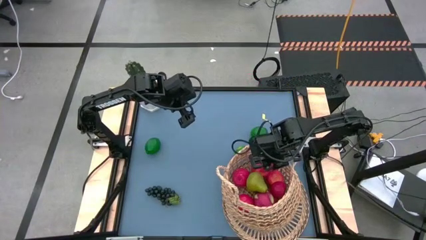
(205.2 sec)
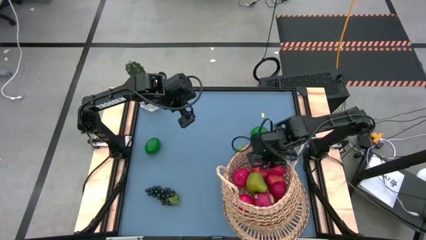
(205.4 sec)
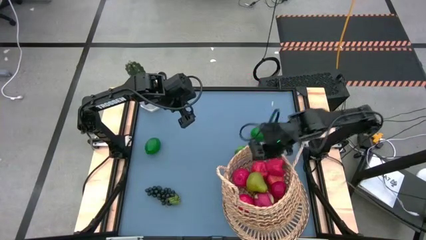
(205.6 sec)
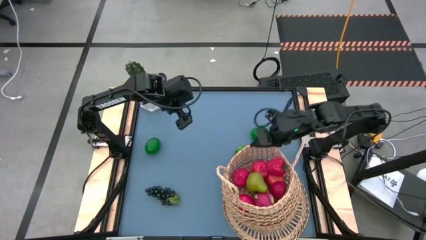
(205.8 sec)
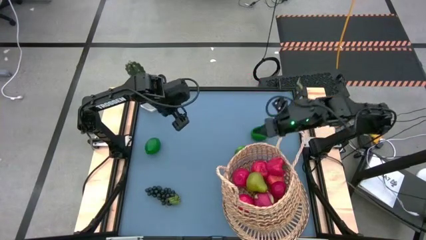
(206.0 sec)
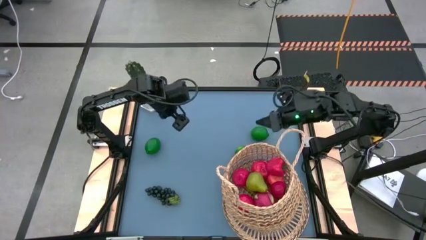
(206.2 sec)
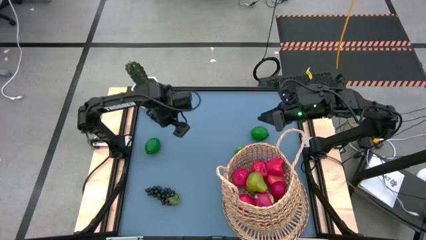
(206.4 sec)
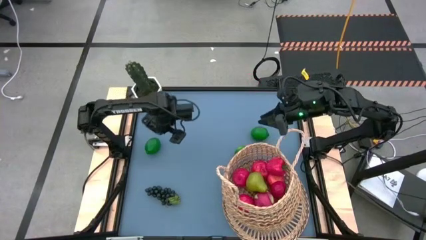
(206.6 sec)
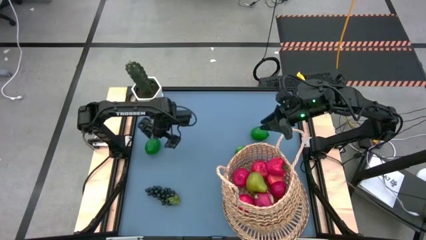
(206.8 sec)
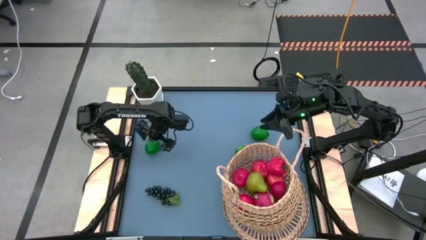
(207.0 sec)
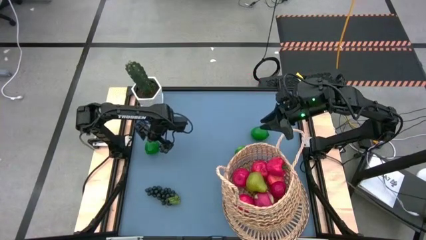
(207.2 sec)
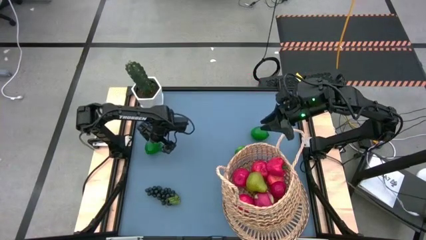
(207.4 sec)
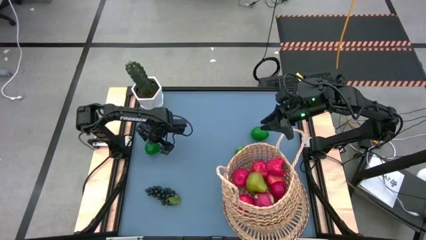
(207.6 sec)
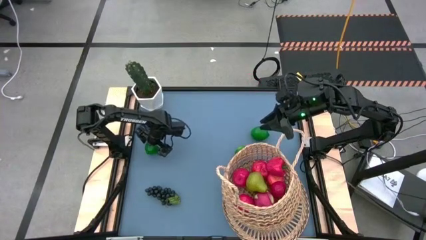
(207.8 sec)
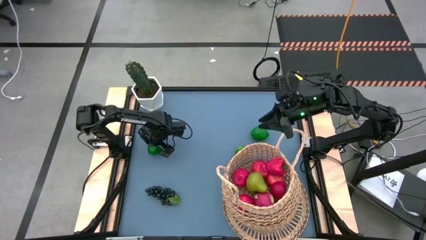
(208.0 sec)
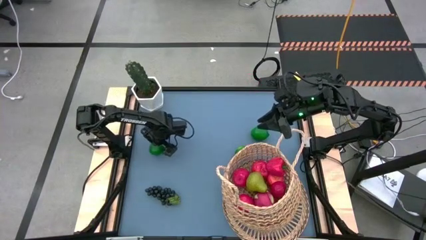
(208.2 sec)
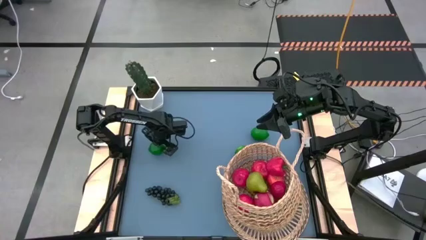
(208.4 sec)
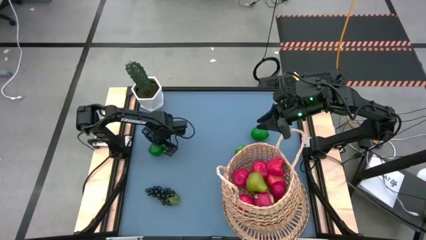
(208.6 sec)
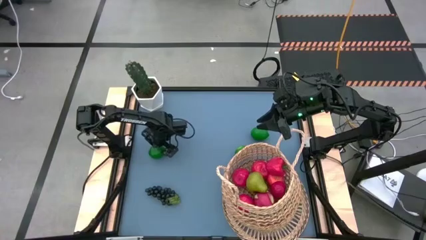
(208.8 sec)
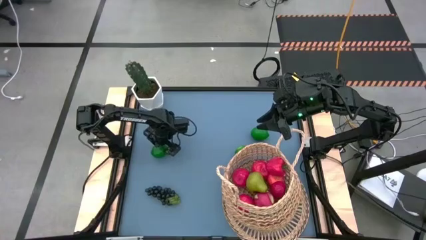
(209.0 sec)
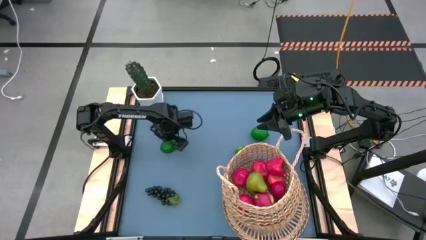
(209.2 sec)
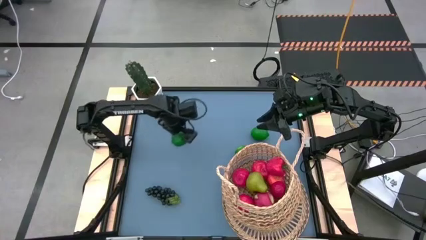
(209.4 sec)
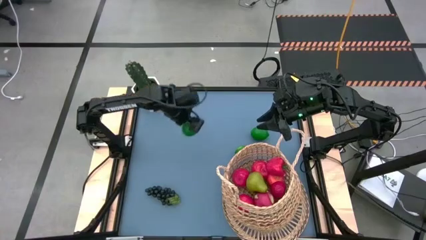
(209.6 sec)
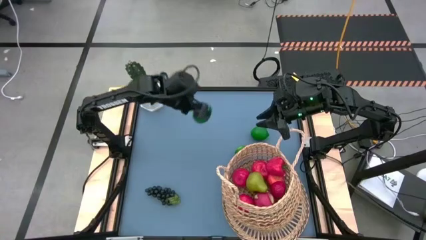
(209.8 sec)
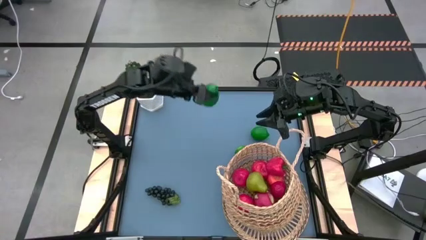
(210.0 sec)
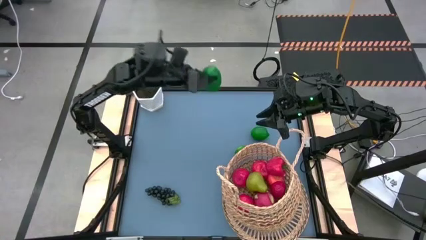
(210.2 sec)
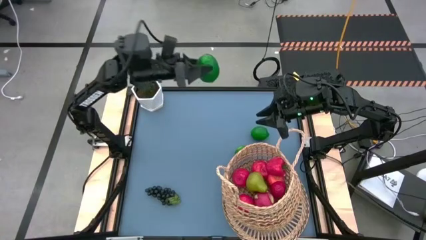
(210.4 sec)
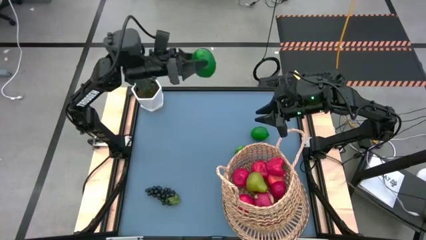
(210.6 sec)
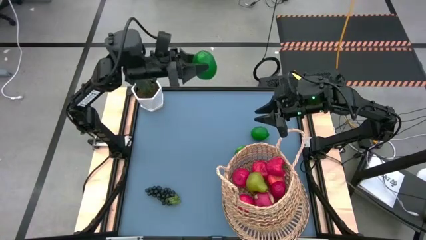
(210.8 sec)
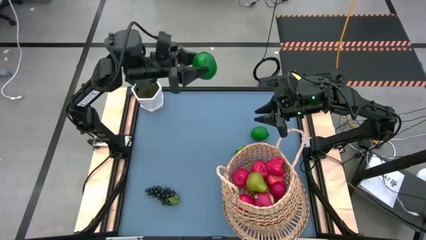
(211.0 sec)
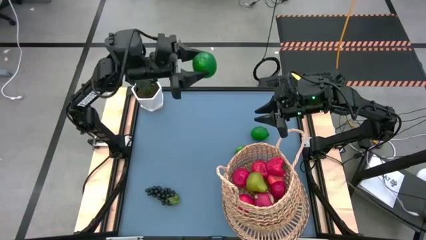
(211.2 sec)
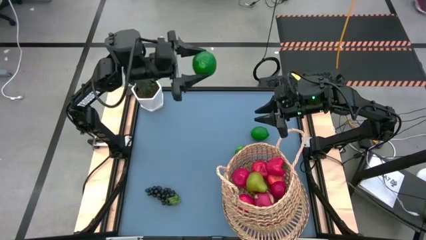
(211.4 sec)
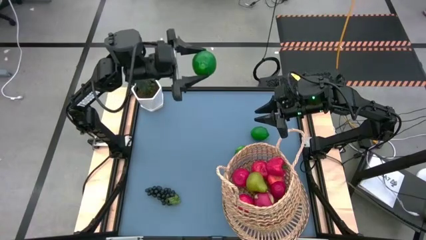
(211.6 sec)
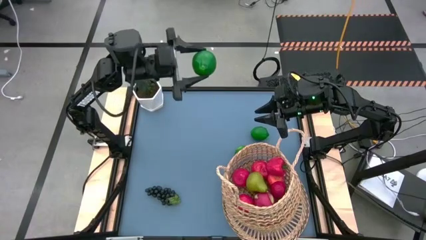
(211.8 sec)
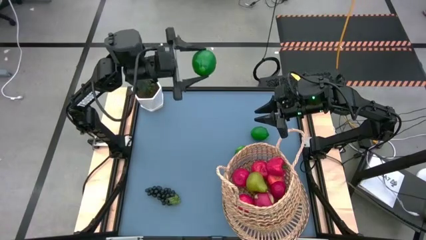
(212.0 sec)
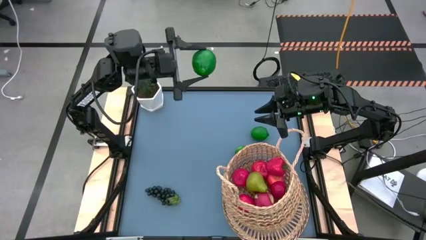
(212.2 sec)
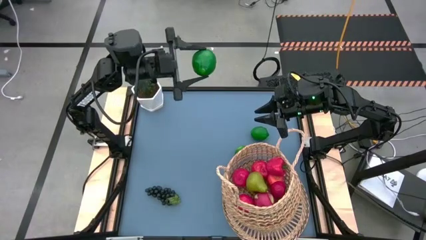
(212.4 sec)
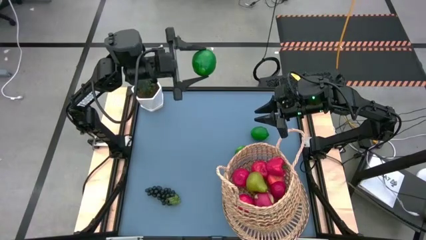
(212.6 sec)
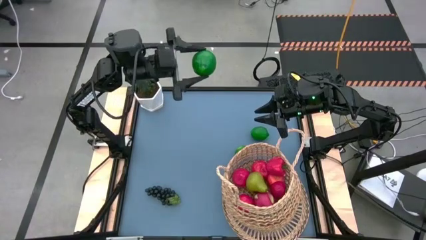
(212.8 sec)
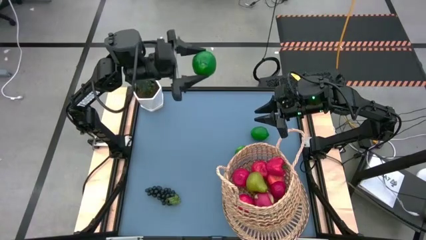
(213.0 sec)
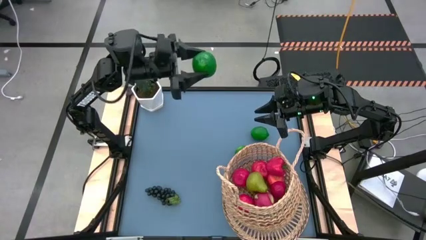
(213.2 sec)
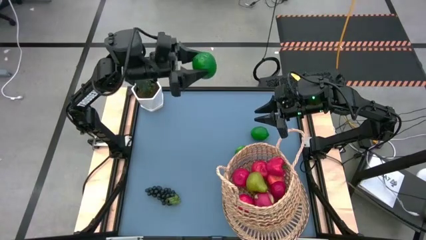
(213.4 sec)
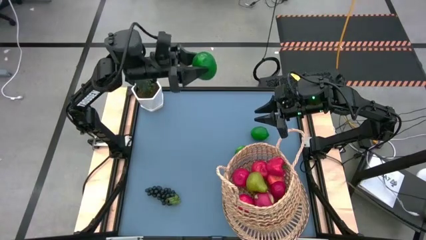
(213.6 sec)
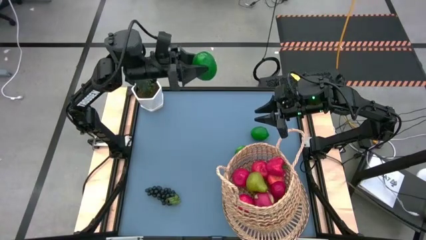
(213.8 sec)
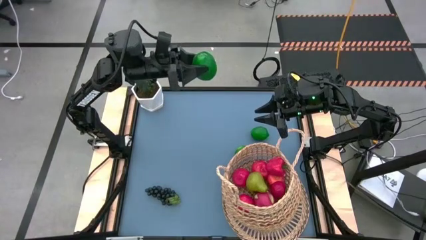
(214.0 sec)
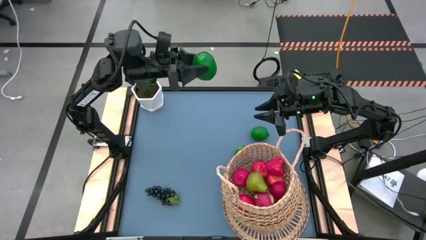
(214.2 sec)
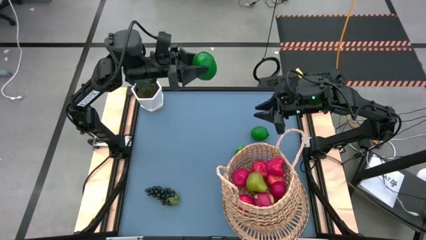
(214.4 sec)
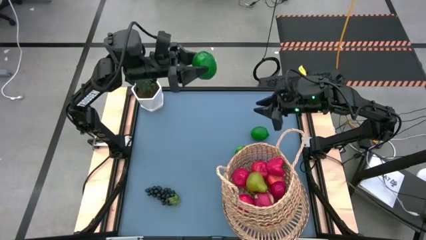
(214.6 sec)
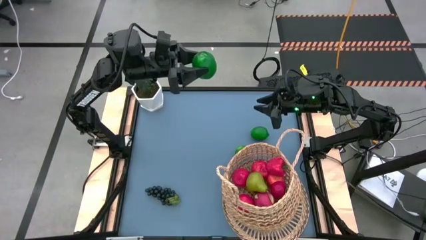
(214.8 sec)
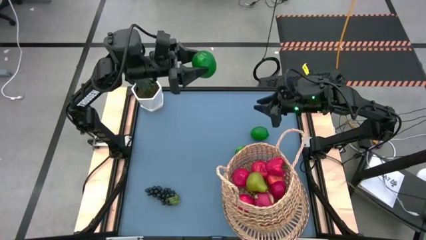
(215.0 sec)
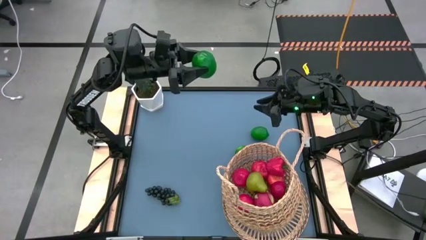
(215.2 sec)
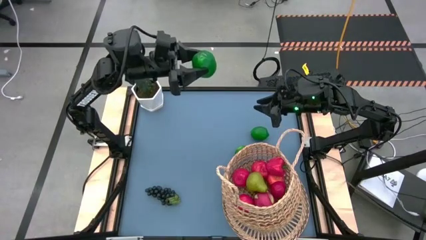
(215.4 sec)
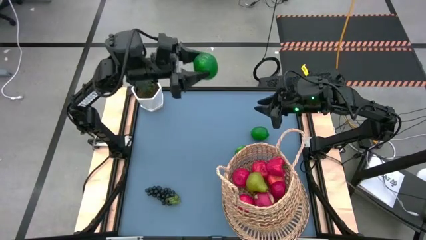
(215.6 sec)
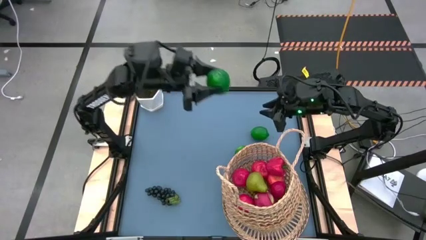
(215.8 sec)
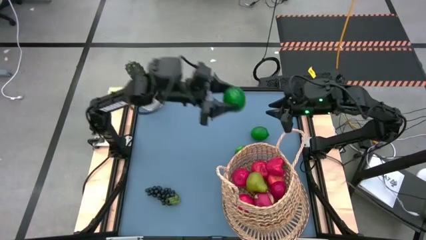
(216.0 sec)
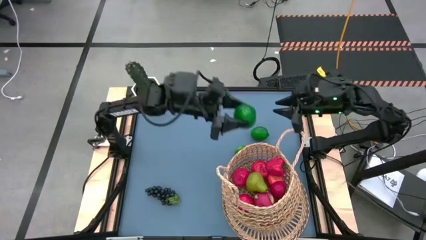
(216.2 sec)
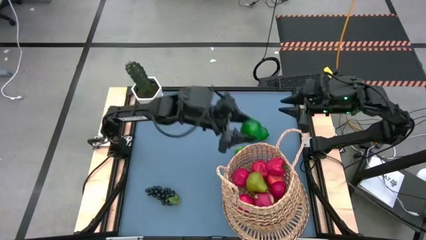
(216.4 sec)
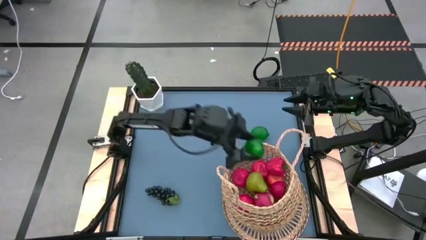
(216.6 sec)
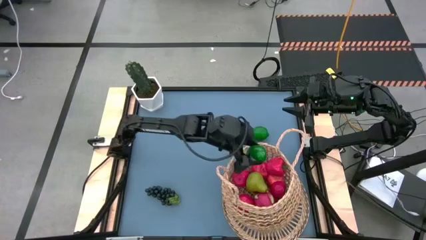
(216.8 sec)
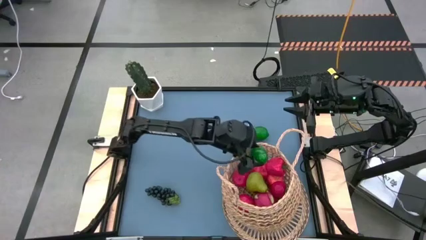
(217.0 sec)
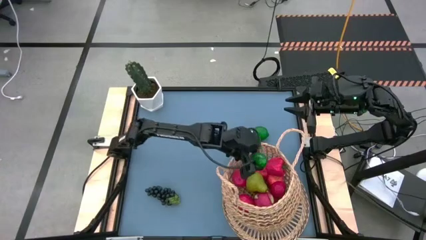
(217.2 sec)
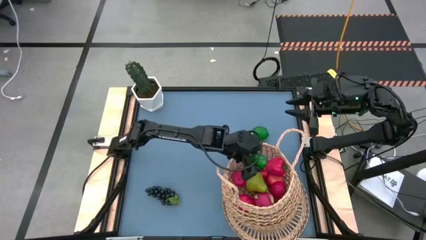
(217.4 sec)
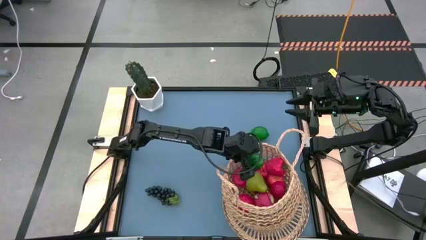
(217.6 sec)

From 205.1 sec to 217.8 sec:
Task: Build produce basket
Put the green lime into the brown basket

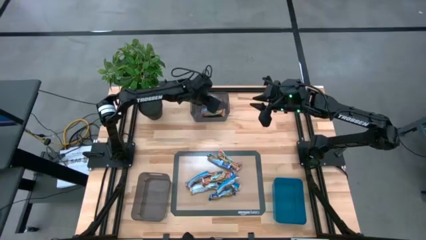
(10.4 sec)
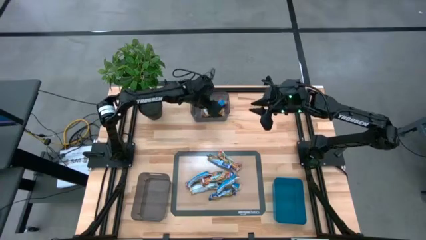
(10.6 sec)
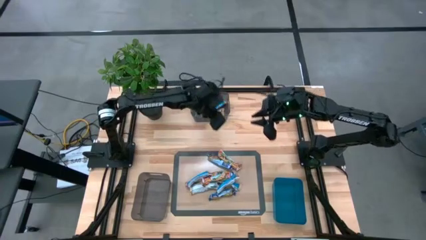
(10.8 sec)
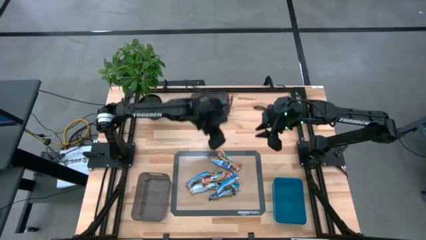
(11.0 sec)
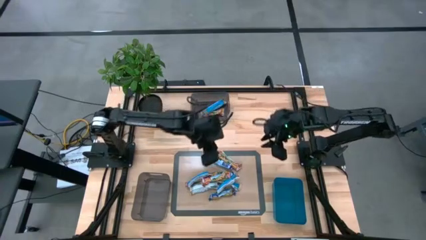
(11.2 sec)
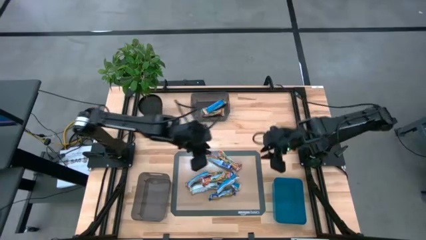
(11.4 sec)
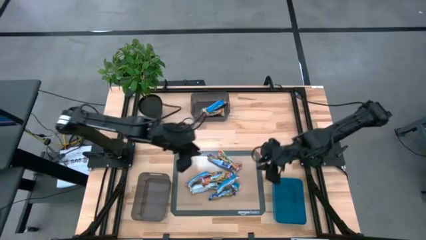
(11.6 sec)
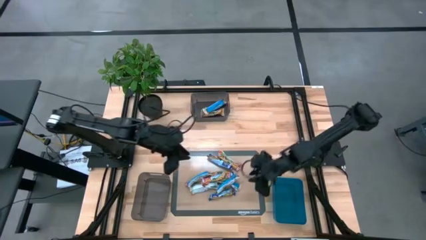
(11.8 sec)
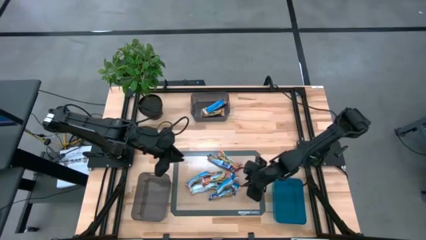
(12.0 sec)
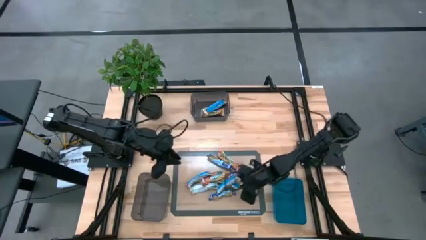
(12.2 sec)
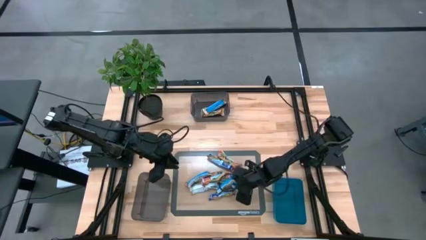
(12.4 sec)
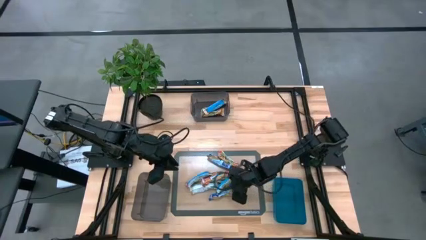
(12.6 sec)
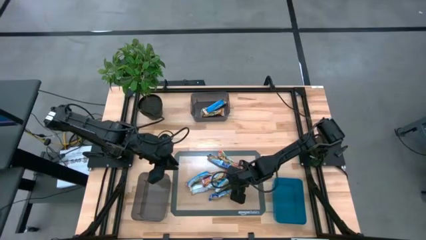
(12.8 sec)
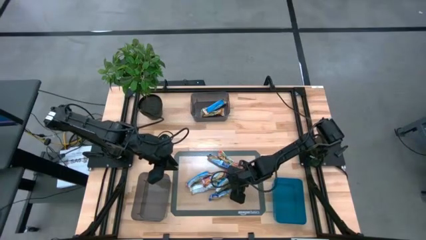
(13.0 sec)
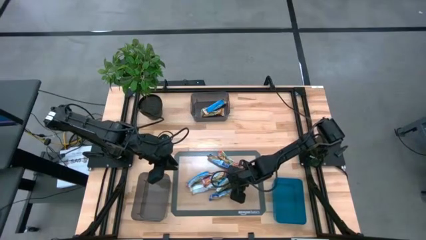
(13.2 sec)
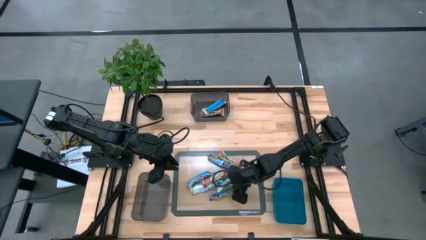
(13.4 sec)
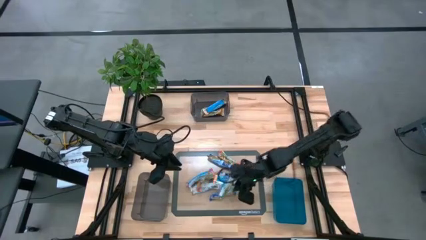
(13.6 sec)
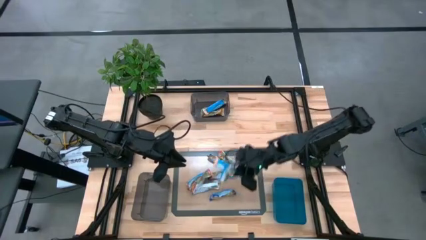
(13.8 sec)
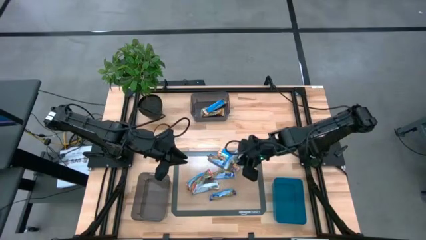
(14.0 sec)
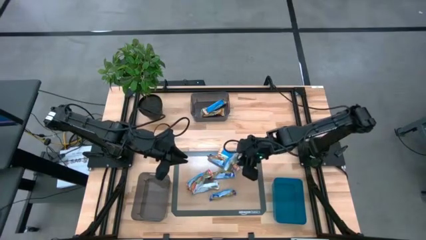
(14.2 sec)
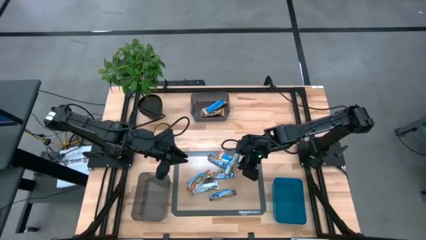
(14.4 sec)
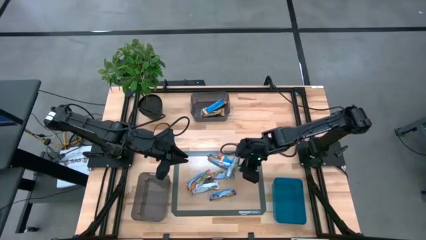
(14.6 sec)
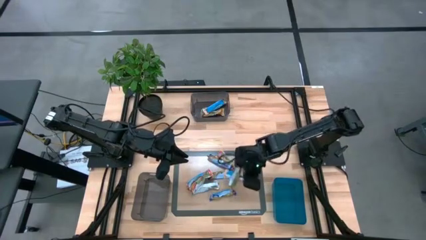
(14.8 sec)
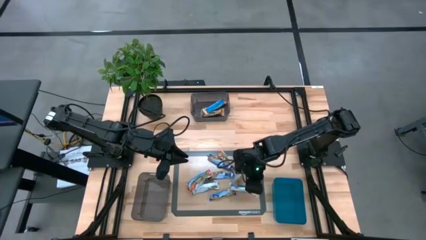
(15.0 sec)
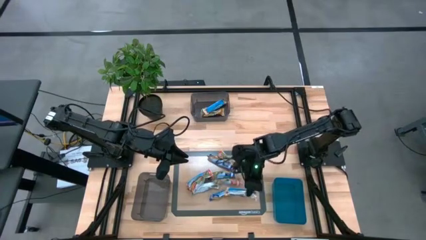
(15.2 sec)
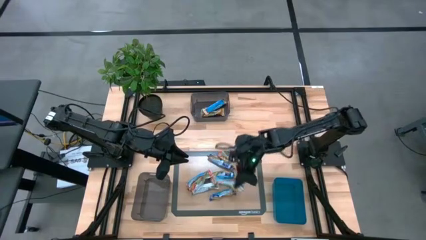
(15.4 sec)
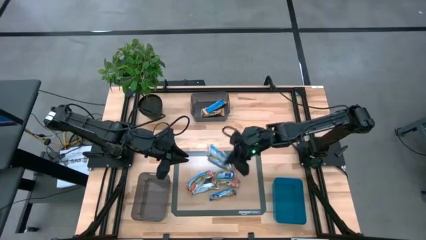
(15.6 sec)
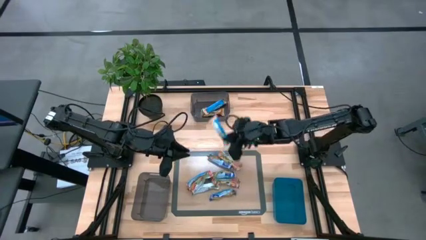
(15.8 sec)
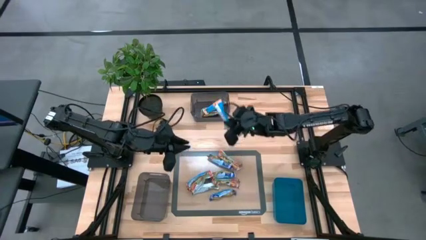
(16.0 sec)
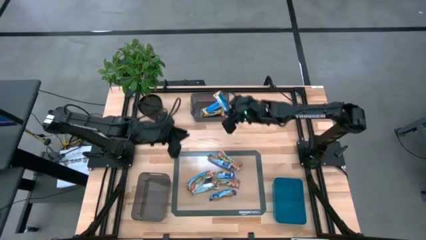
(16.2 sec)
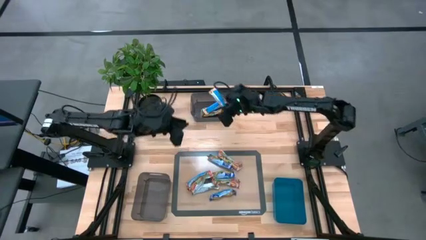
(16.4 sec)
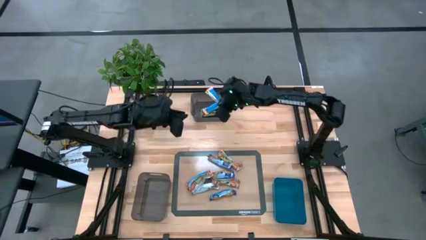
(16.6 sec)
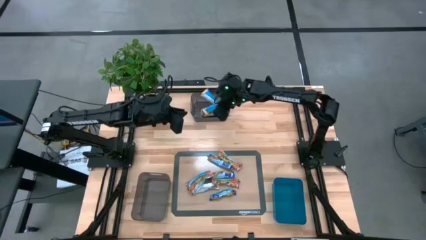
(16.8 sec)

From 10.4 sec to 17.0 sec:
Task: Pick and place Granola Bars by type
Put the yellow granola bar into the top black transparent bin
